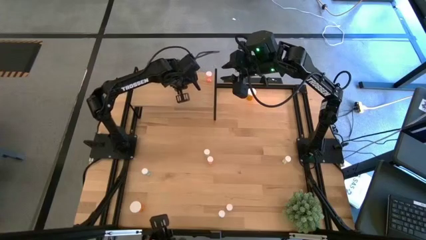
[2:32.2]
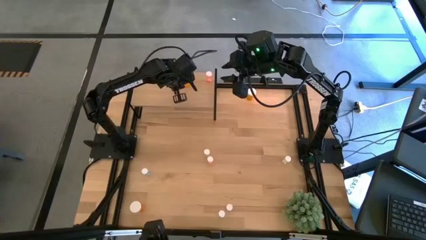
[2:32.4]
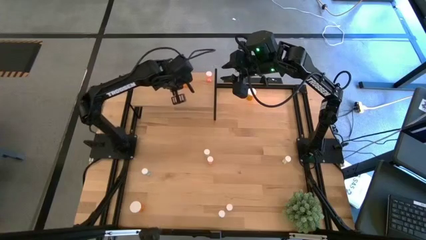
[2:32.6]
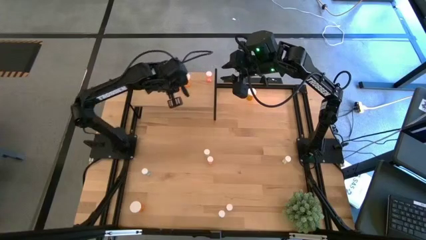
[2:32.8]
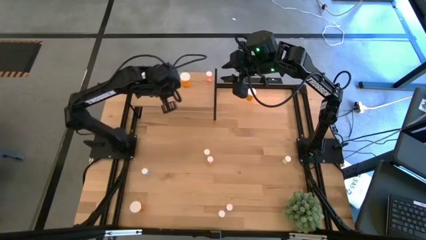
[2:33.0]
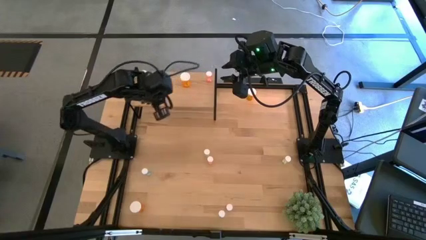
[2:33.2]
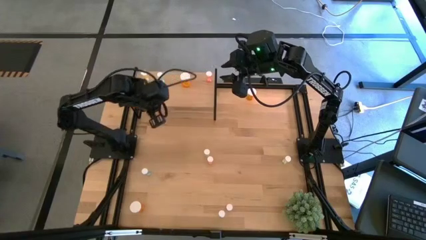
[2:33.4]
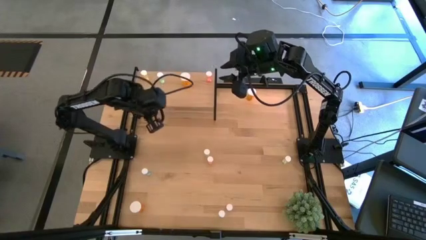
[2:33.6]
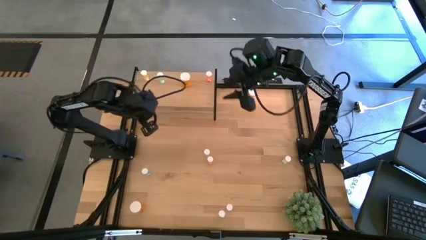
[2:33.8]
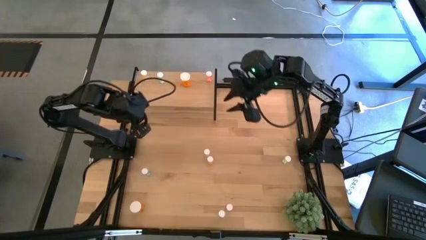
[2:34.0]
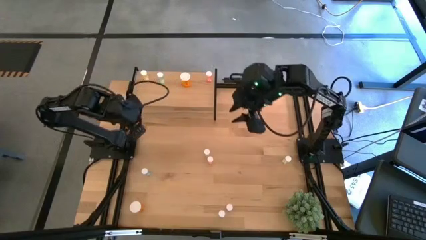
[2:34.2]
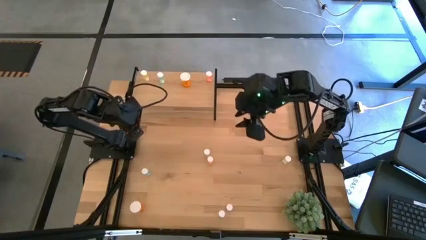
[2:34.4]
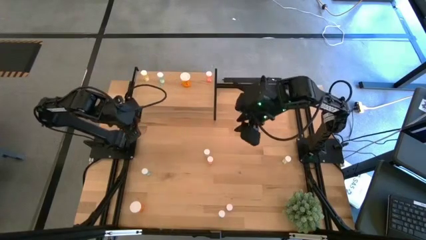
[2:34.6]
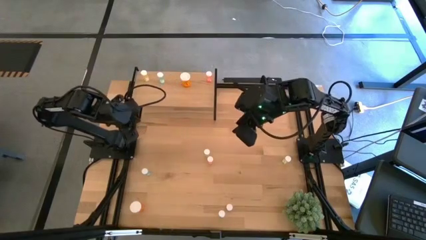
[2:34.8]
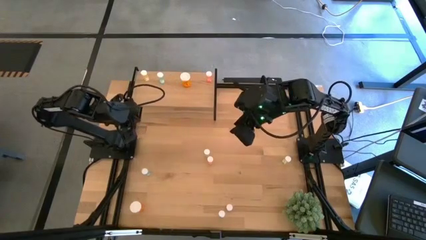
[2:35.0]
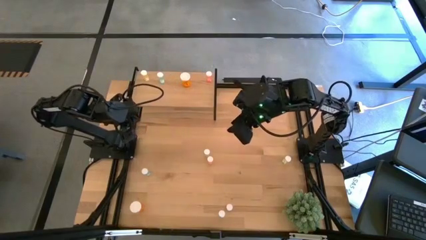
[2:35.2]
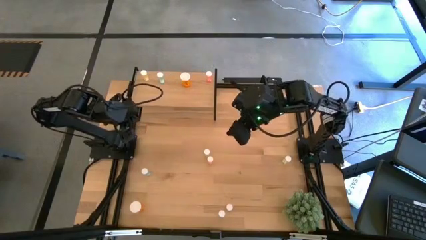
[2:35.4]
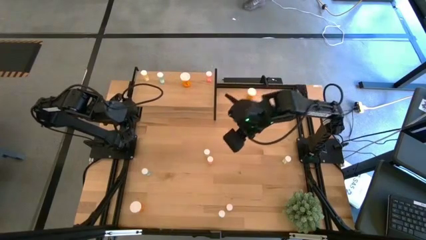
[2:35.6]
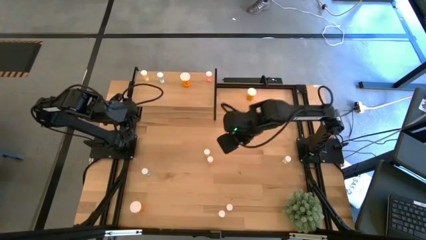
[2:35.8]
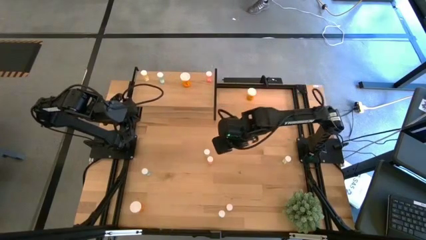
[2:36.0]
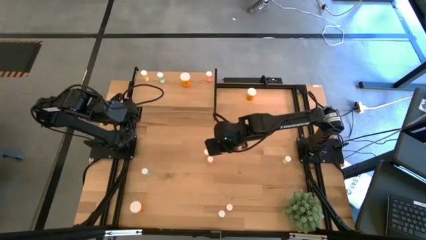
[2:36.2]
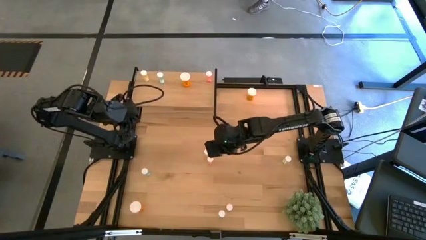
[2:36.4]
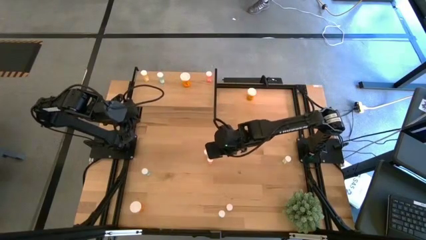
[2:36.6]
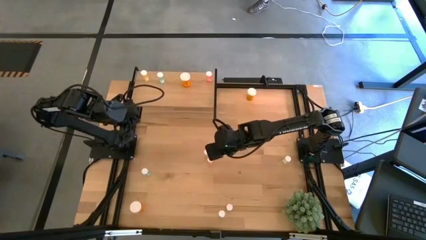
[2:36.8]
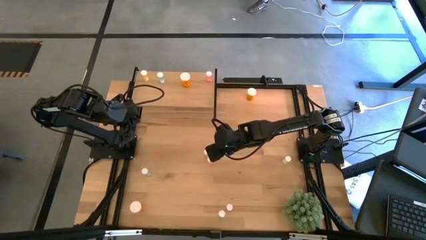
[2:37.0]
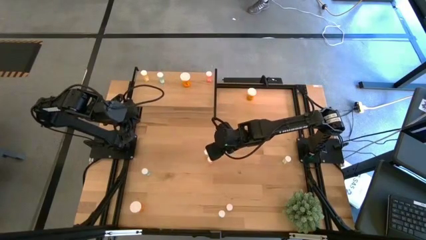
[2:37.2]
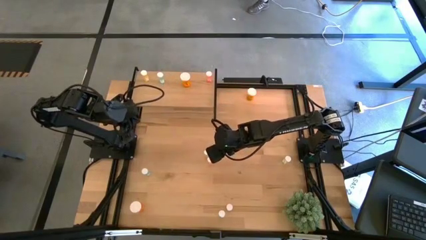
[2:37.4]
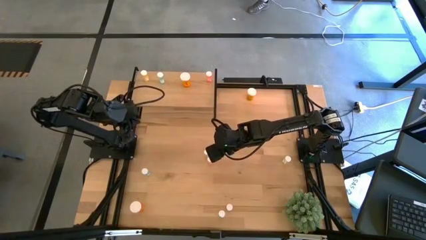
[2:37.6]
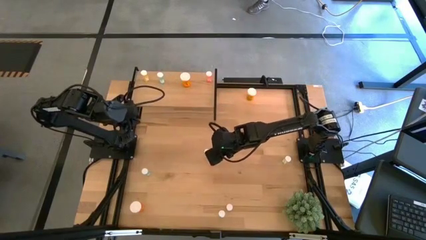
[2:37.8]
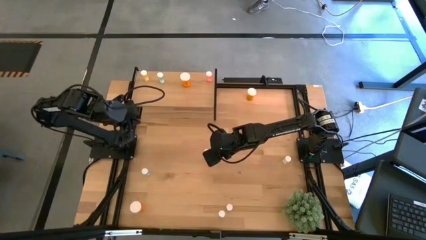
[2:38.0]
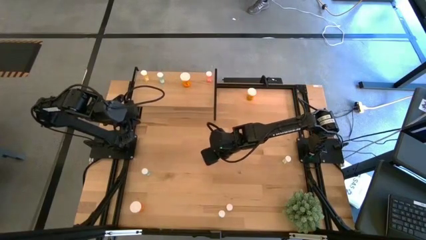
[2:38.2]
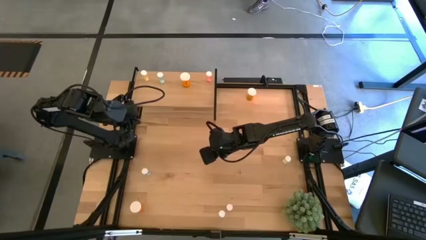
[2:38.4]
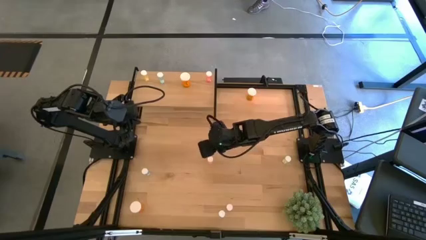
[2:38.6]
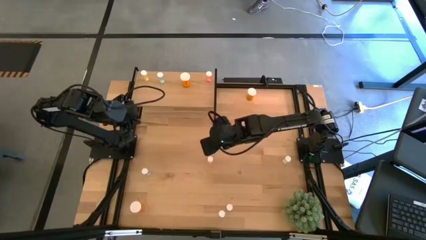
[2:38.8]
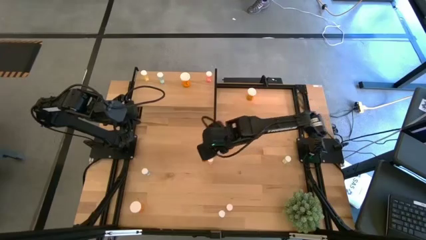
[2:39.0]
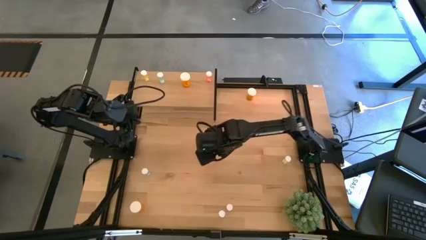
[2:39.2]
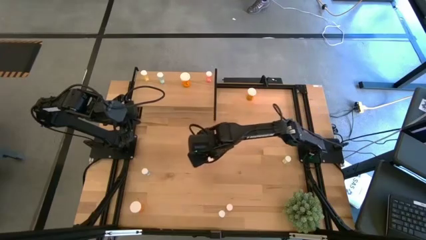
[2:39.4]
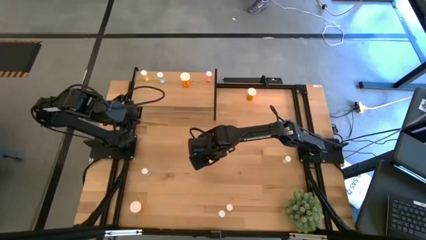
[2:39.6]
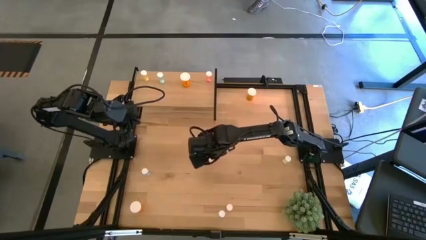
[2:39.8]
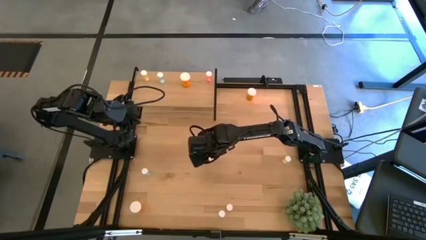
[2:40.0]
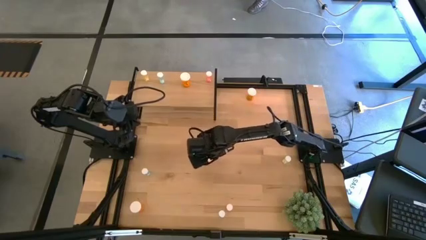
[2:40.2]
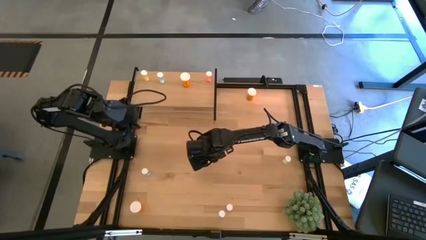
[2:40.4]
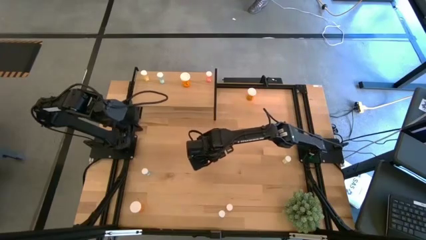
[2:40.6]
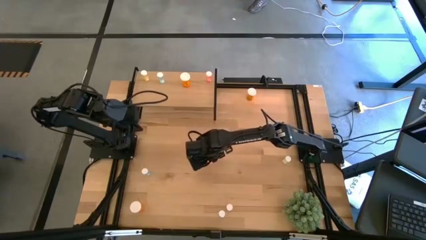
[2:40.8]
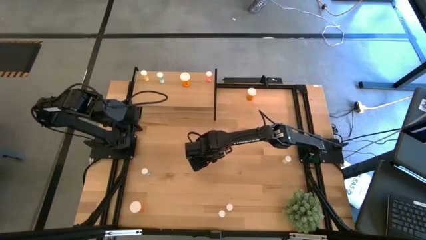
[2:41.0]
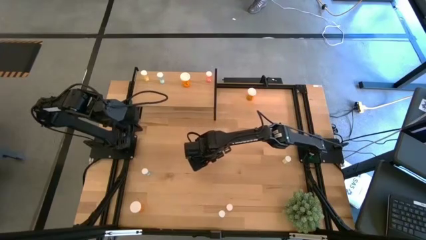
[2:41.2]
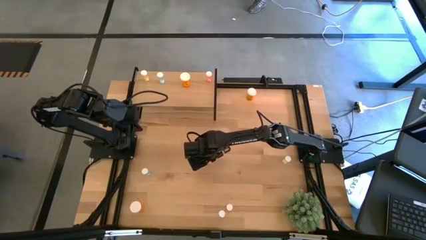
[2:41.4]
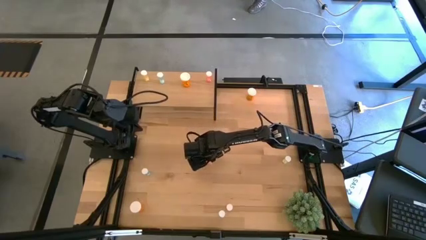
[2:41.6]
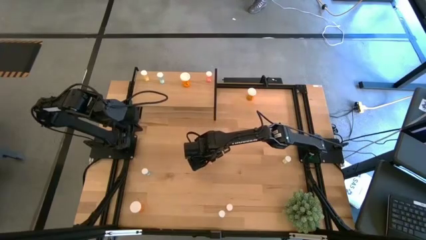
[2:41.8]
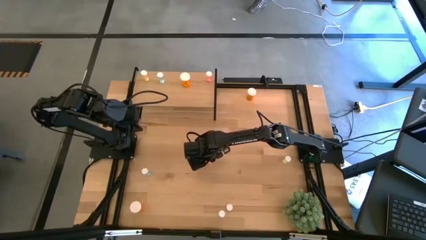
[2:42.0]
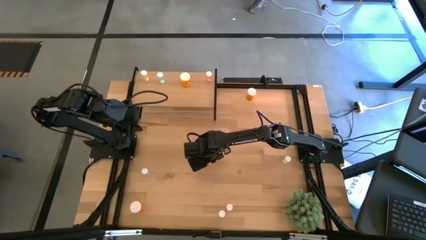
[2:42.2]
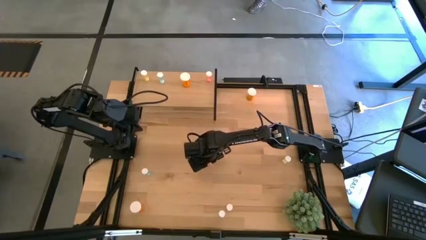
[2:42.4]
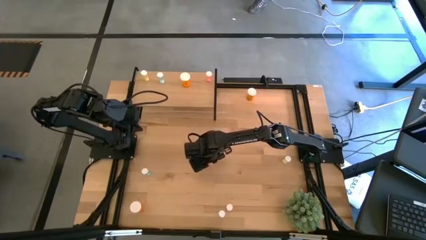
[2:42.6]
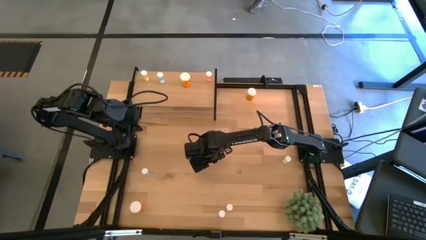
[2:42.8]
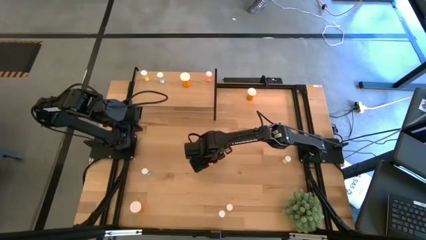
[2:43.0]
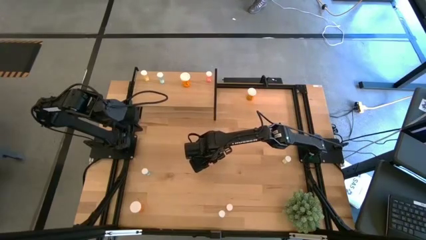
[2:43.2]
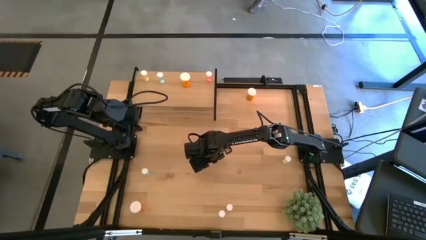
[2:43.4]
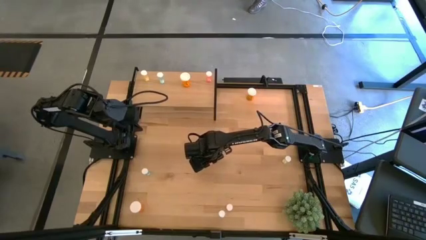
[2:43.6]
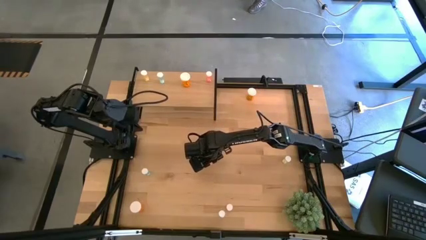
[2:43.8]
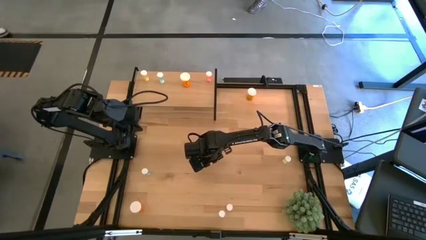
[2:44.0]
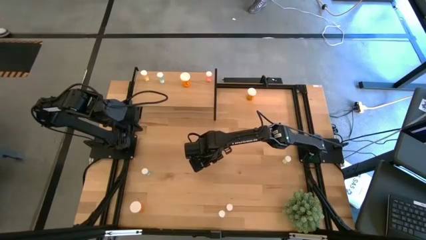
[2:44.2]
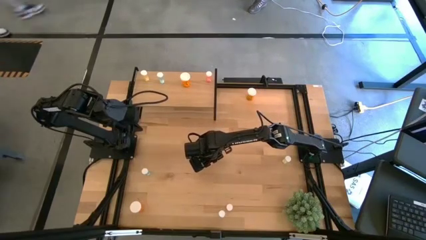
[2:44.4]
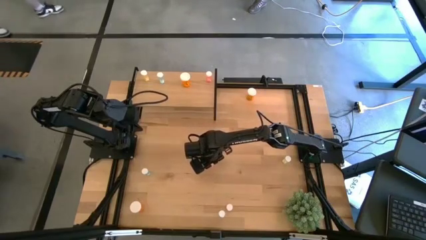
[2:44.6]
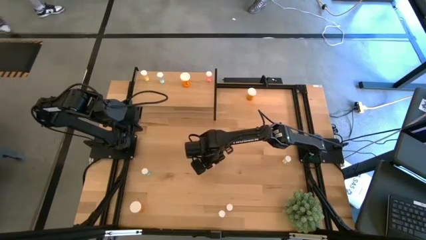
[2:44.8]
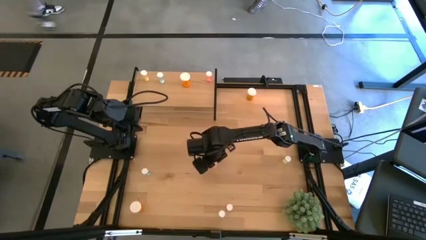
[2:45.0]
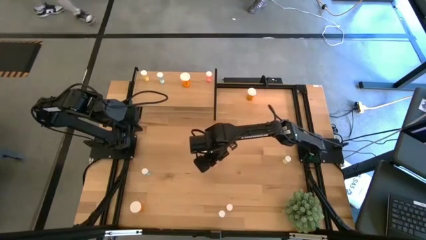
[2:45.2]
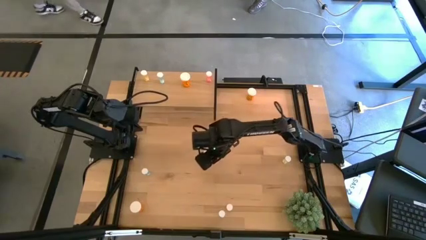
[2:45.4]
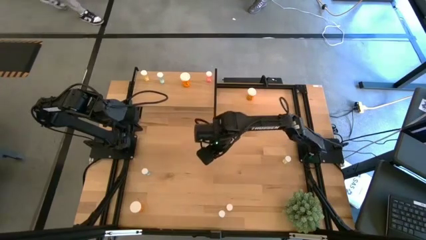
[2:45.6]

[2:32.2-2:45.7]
Task: Pick and place medicine bottles onto shelf by color
Put the top small red pill bottle on the shelf
